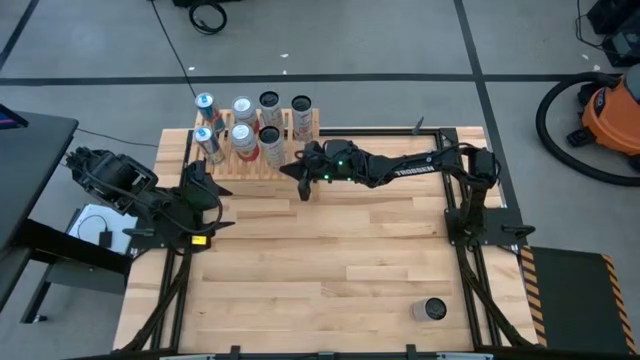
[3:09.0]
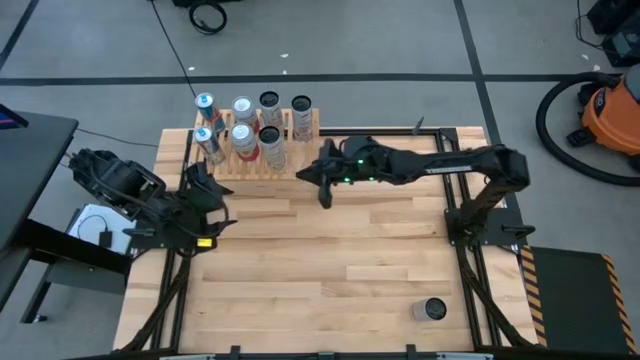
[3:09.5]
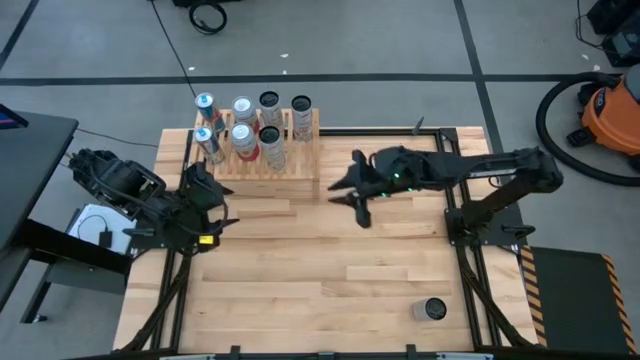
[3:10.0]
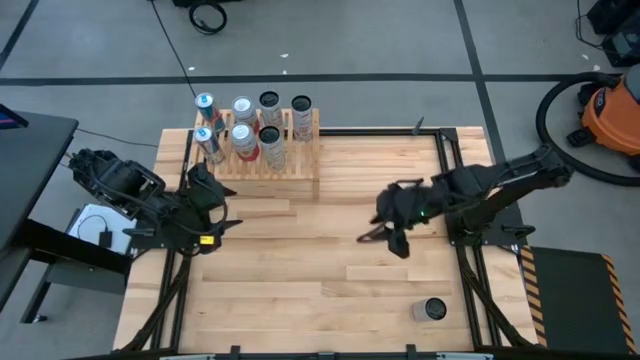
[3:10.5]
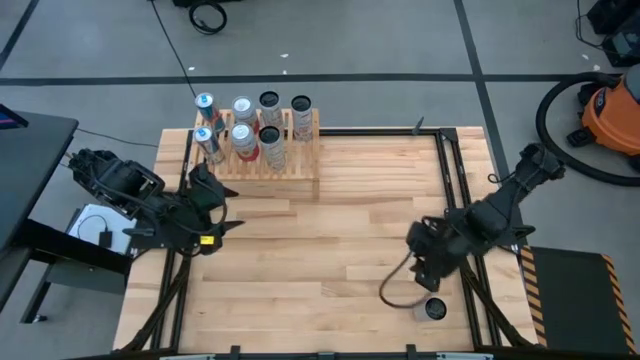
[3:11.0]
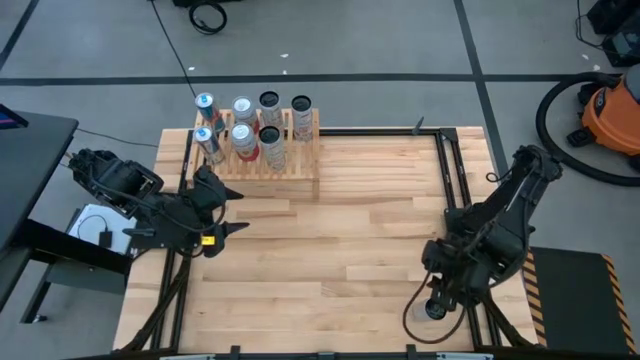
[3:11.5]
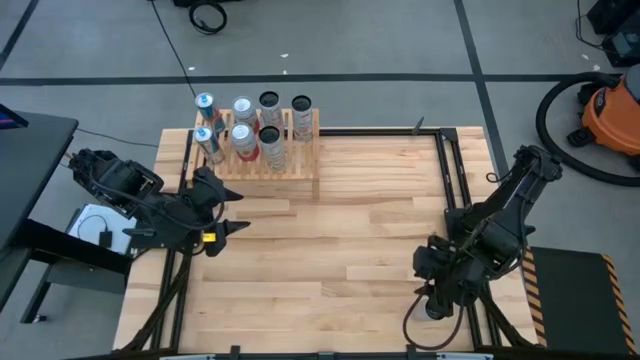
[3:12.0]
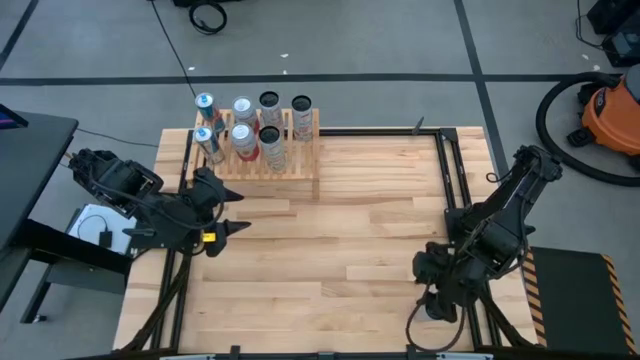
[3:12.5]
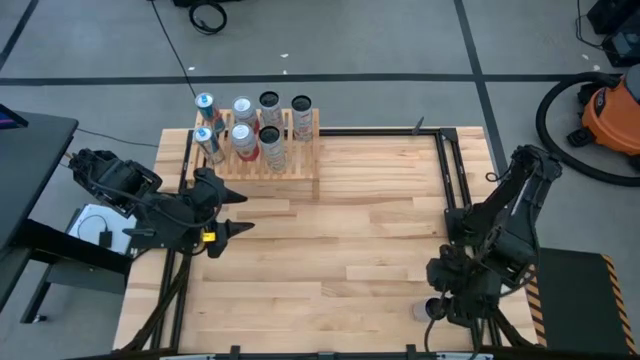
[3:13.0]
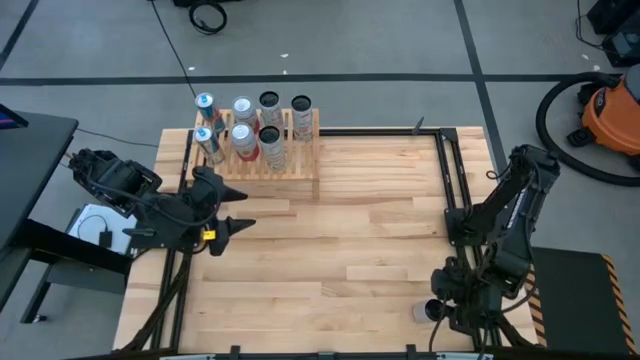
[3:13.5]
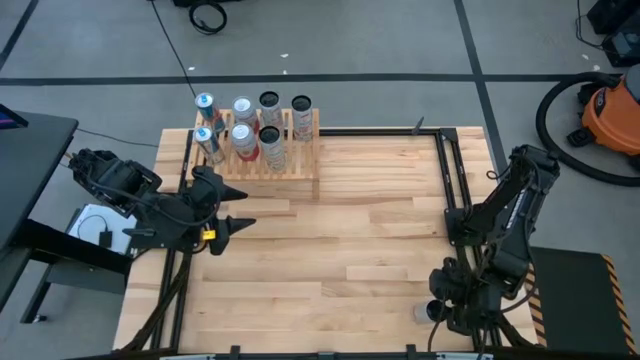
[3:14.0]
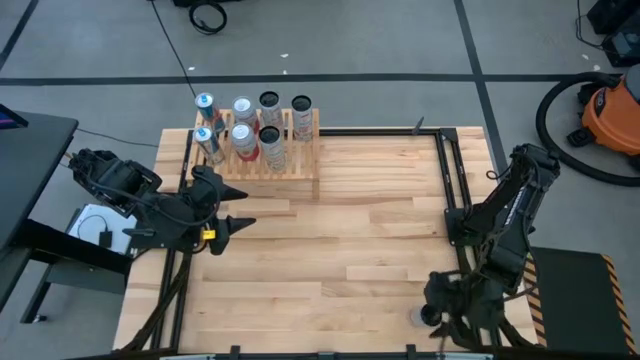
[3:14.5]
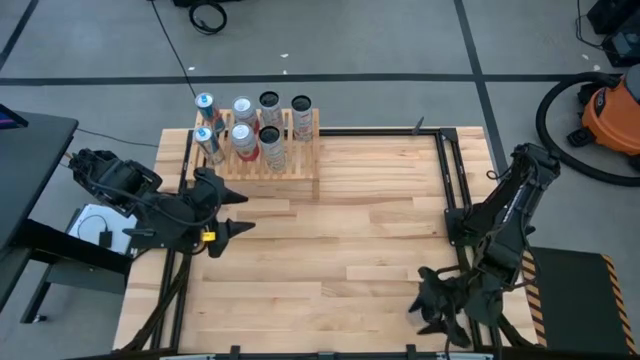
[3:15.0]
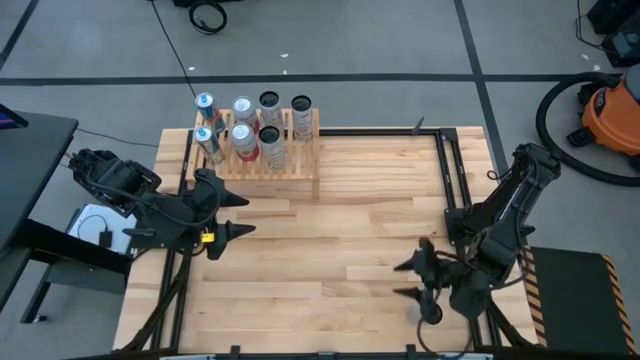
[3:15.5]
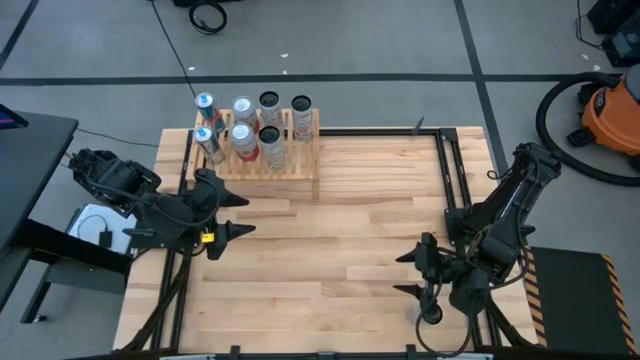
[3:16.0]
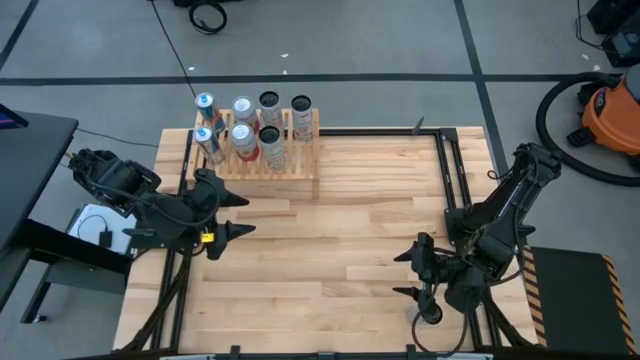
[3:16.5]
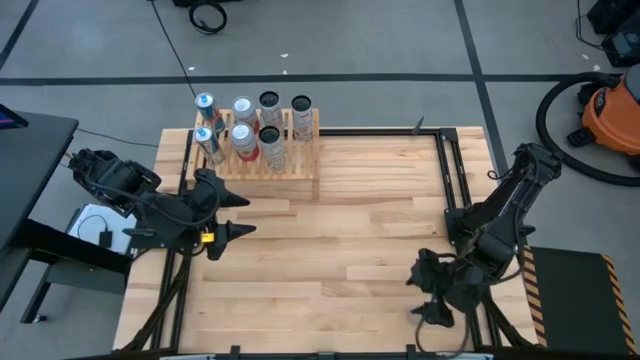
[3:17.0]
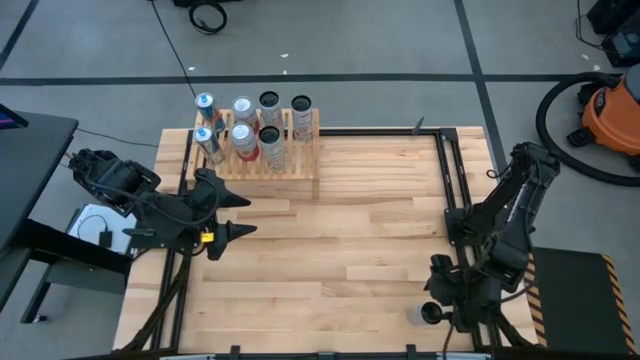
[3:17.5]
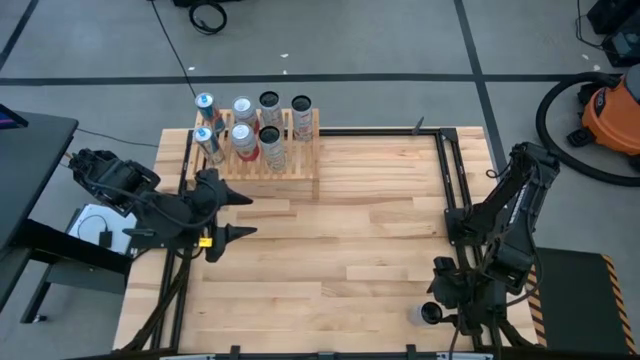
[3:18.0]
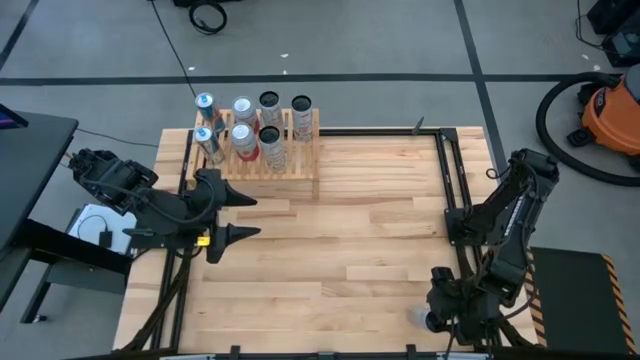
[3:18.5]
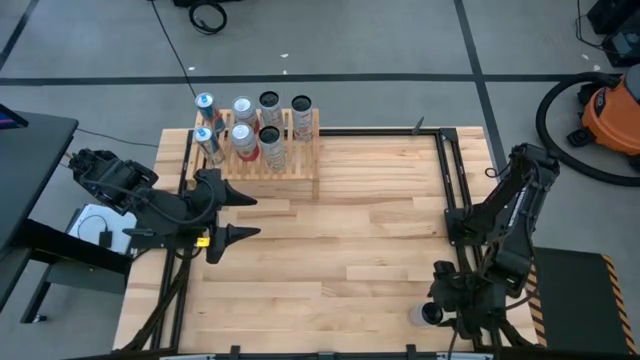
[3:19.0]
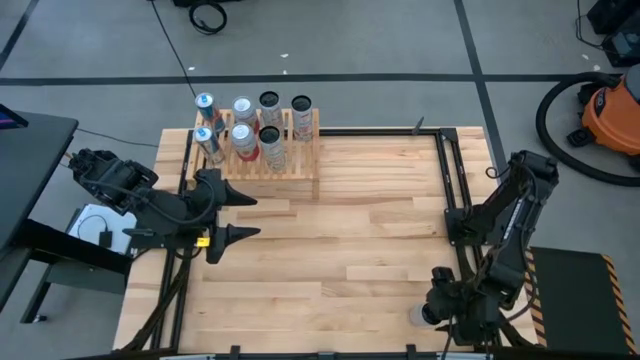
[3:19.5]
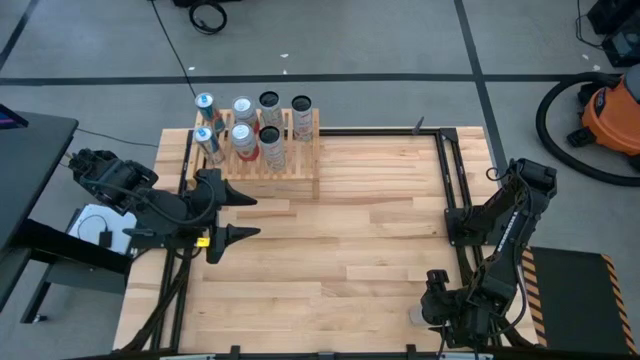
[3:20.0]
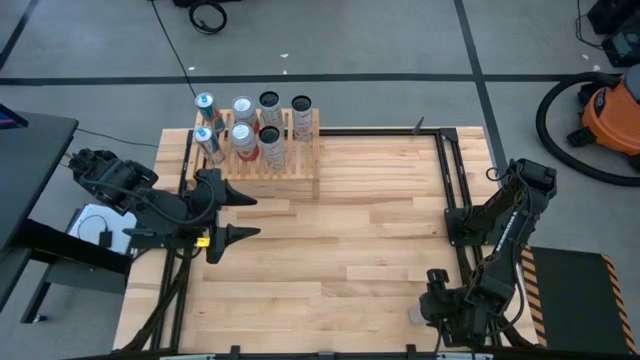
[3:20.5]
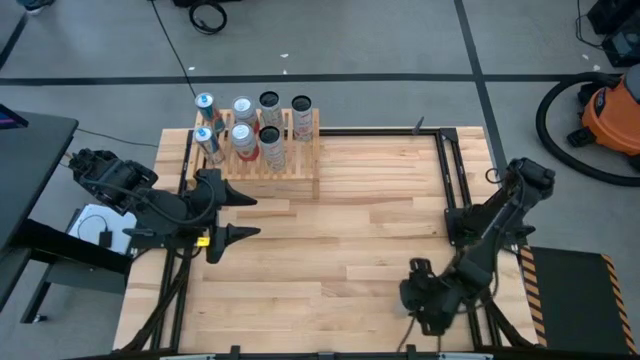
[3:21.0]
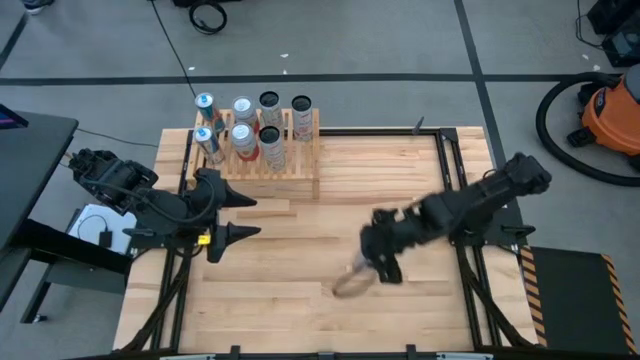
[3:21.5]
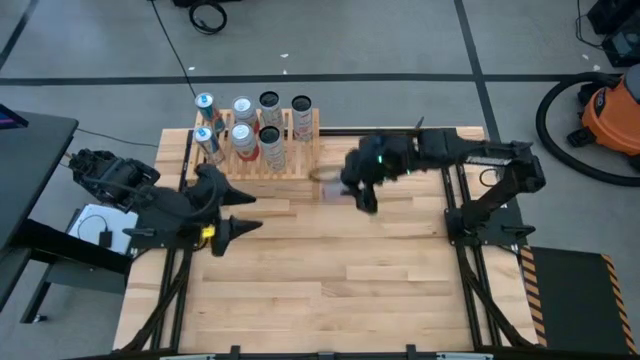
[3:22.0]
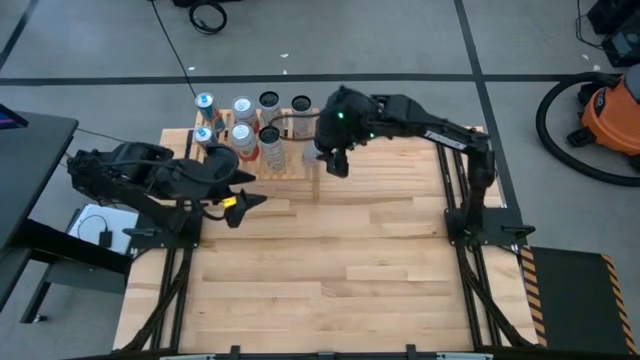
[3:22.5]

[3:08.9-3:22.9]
Task: Place canned beverage on shelf
Put the white and pink soda can on the shelf aligned with the other white and pink soda can on the shelf

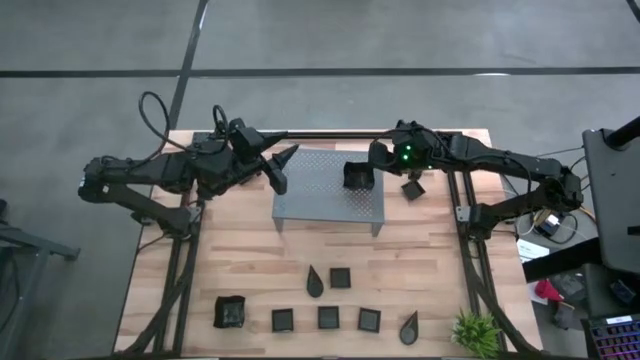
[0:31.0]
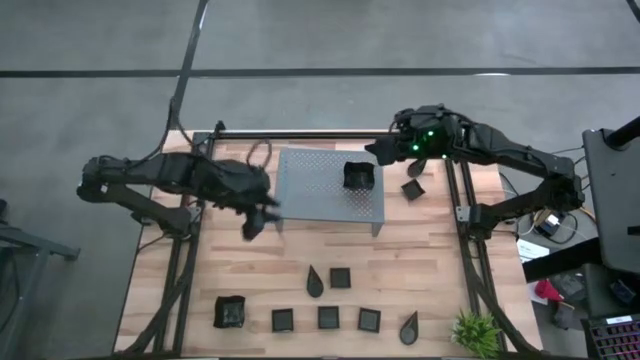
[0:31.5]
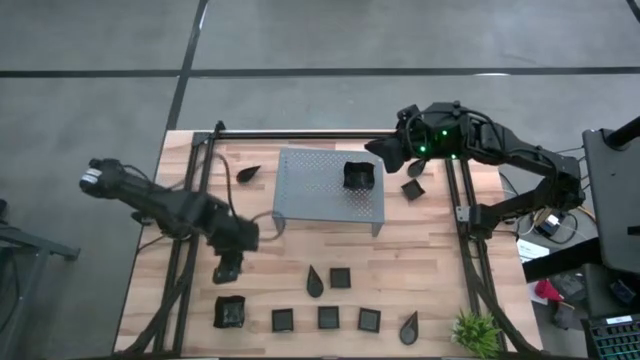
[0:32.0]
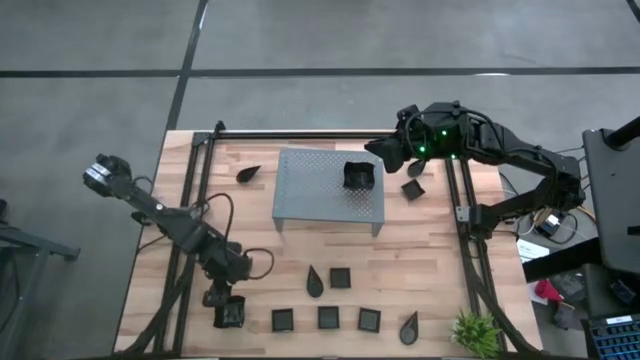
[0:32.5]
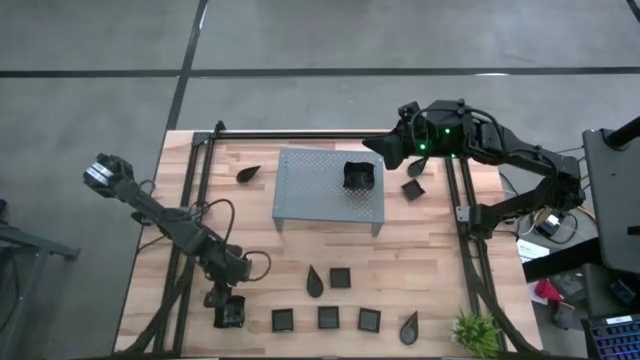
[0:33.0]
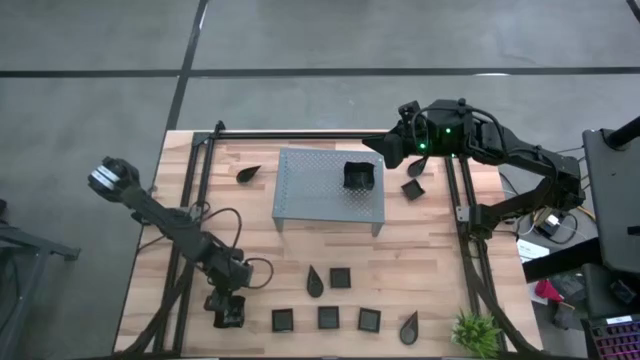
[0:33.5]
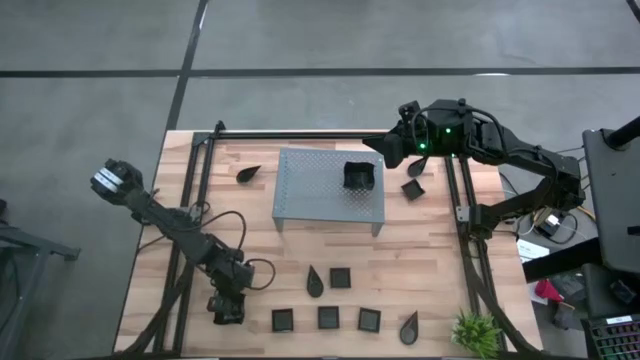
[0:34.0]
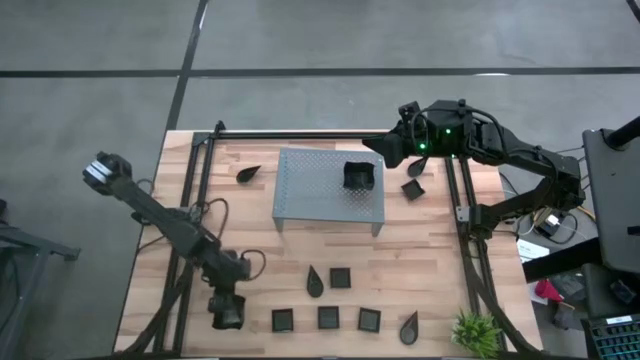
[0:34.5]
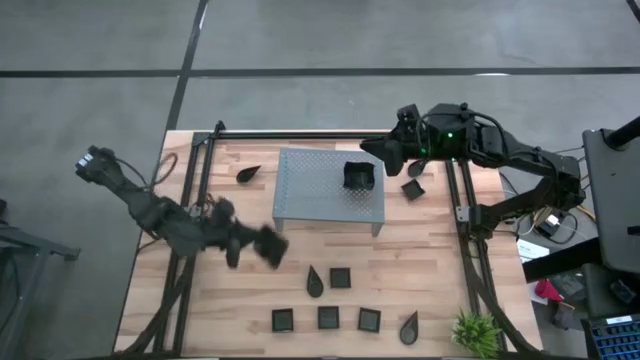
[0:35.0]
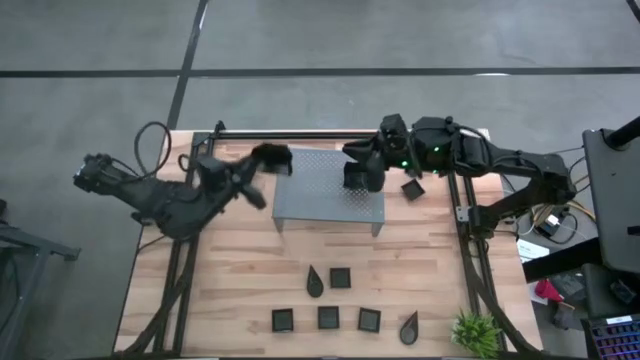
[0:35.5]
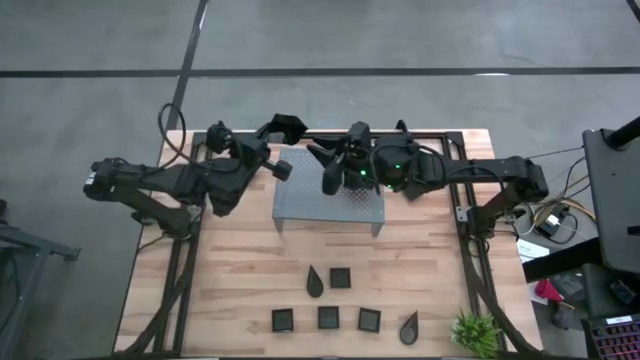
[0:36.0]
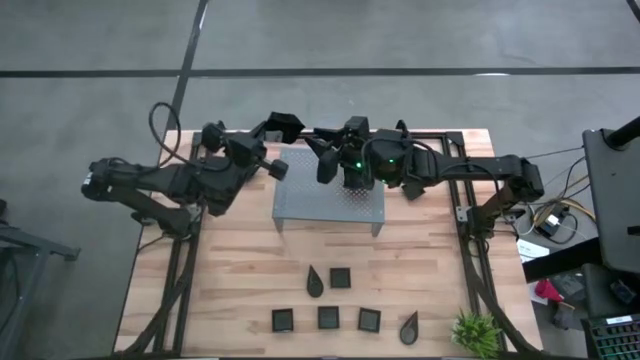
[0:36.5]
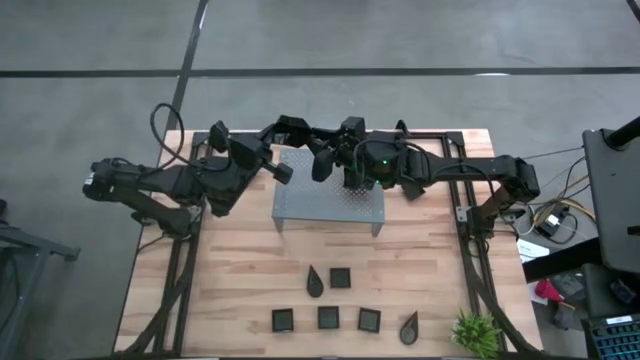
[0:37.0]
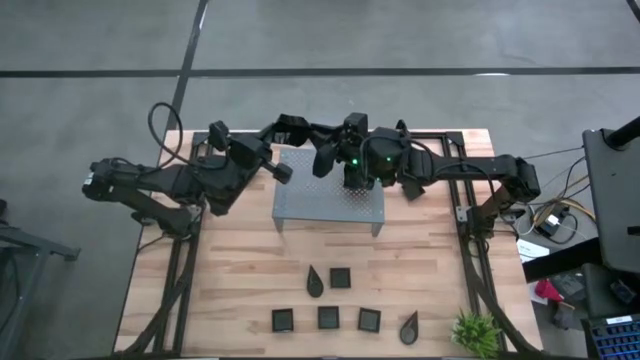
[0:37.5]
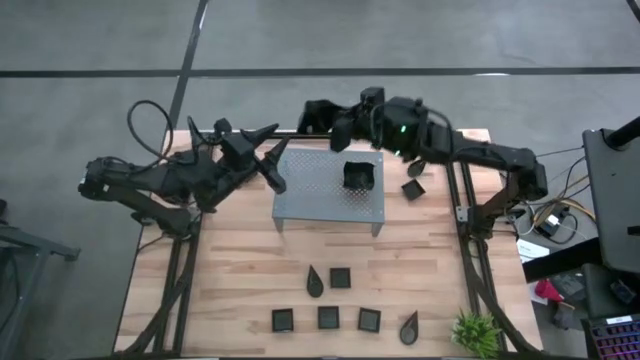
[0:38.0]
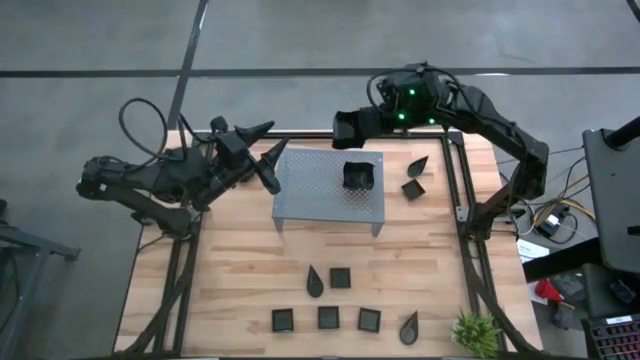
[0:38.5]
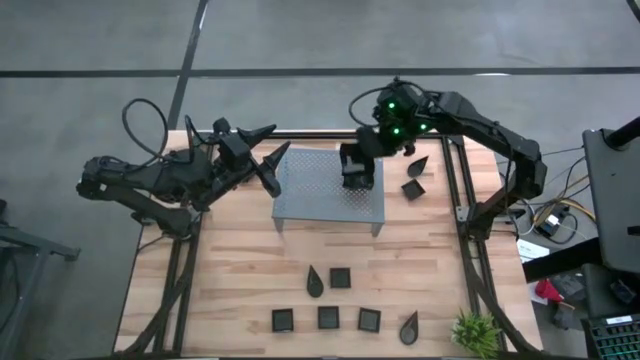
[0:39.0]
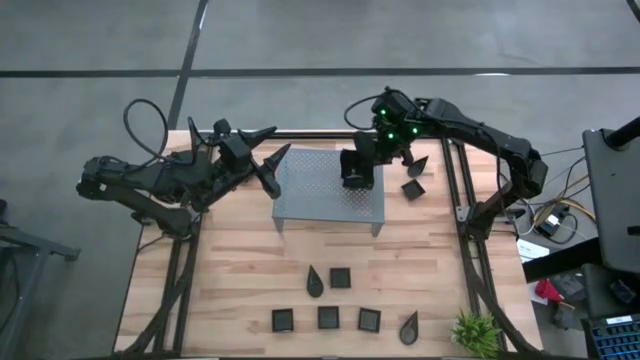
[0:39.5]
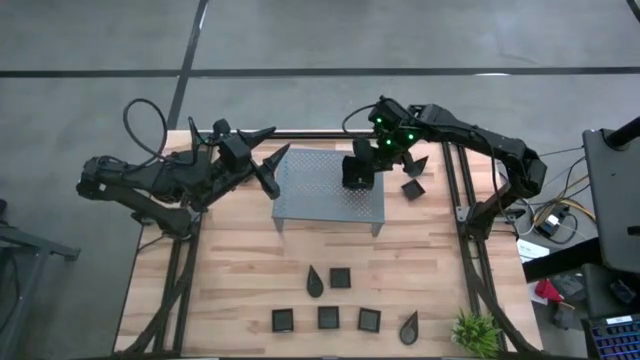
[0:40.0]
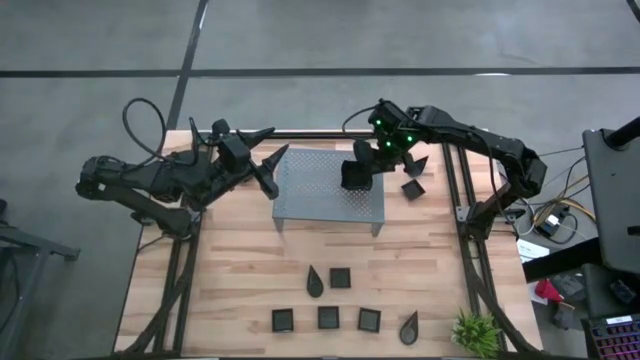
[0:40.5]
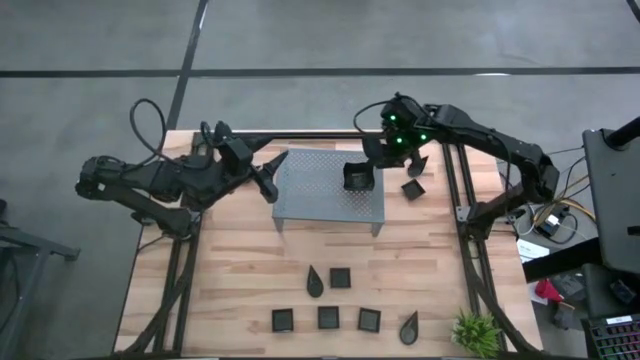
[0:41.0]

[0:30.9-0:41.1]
Task: Pick & Place Mini shaped plates
Stack the black distorted square plate on top of the other black distorted square plates on the shelf
